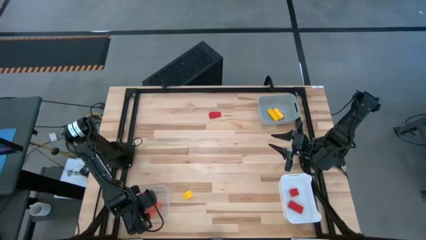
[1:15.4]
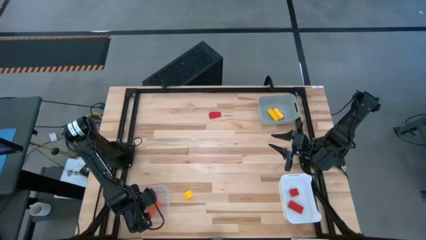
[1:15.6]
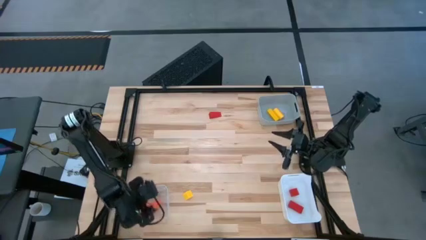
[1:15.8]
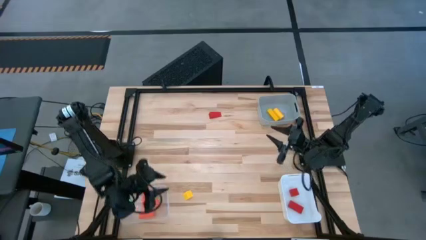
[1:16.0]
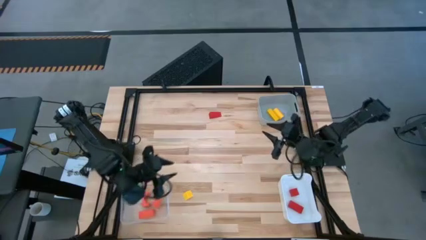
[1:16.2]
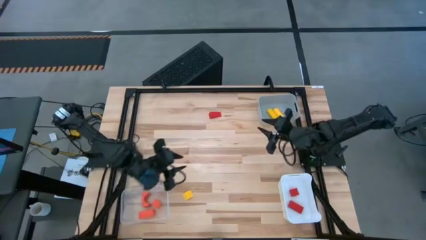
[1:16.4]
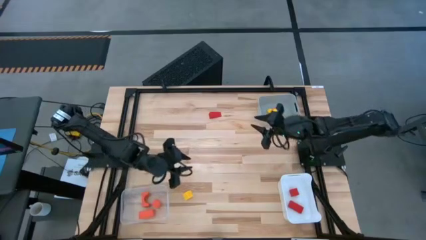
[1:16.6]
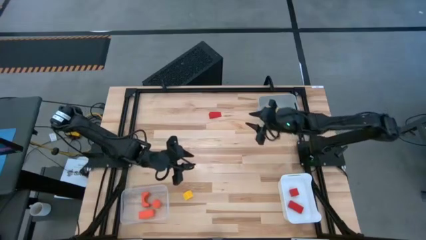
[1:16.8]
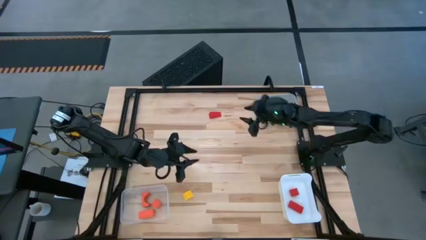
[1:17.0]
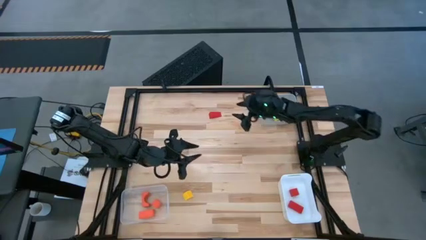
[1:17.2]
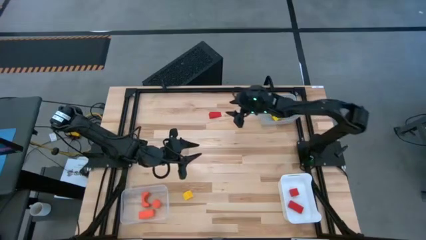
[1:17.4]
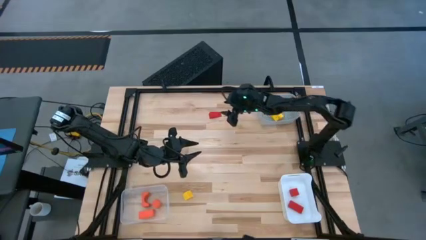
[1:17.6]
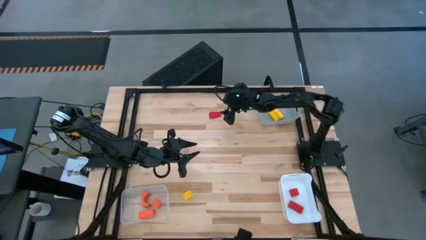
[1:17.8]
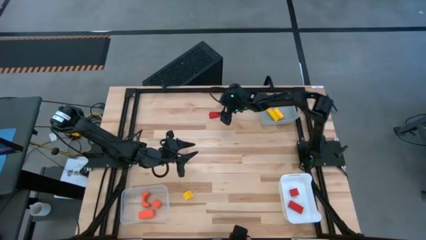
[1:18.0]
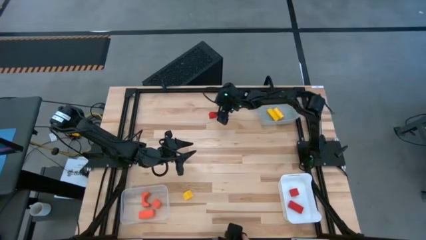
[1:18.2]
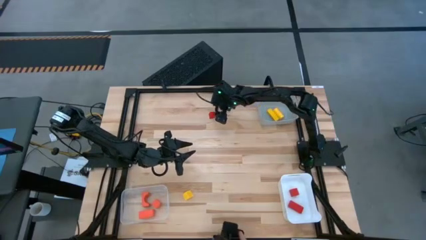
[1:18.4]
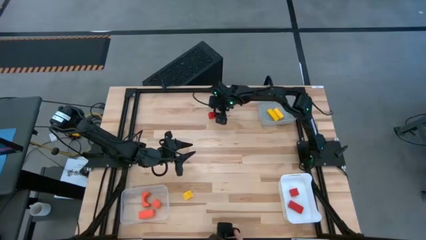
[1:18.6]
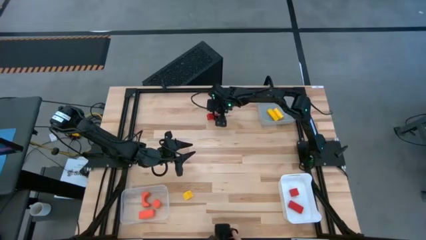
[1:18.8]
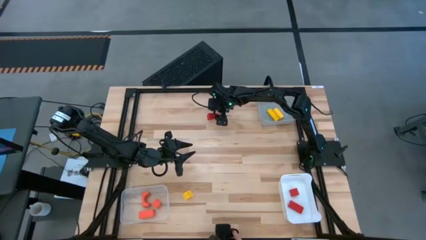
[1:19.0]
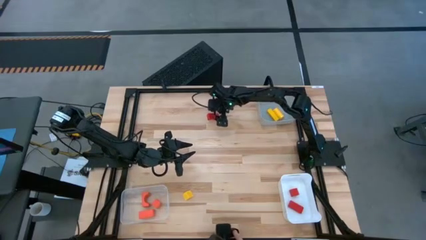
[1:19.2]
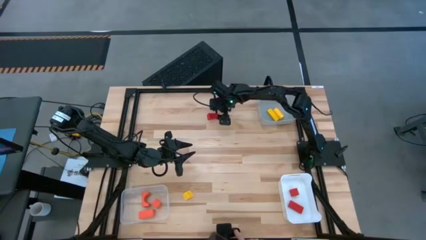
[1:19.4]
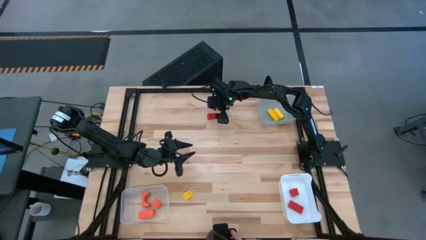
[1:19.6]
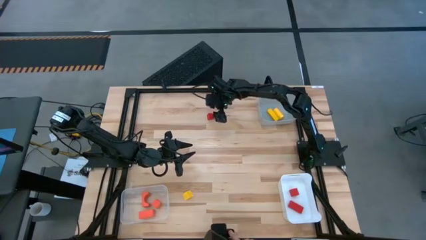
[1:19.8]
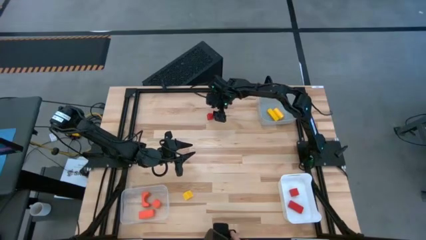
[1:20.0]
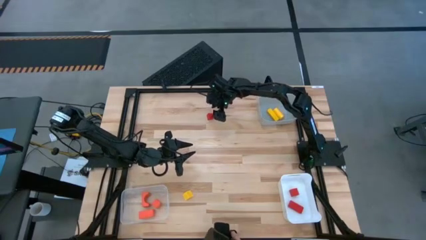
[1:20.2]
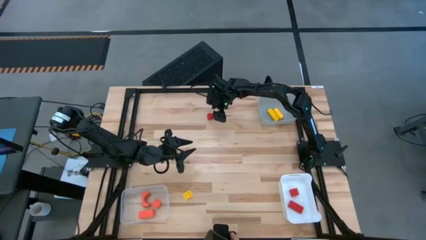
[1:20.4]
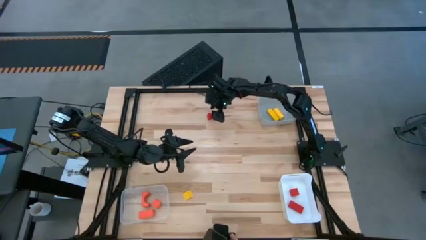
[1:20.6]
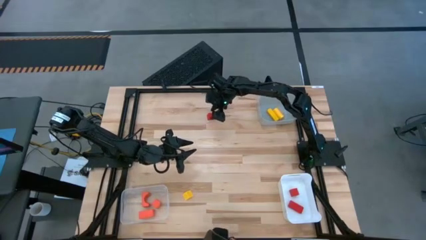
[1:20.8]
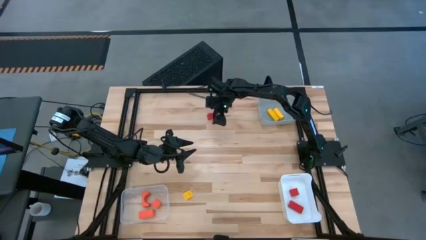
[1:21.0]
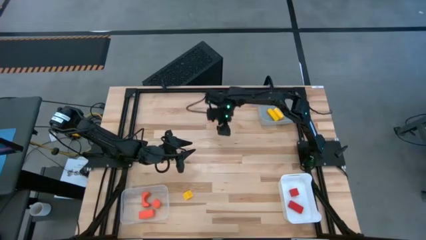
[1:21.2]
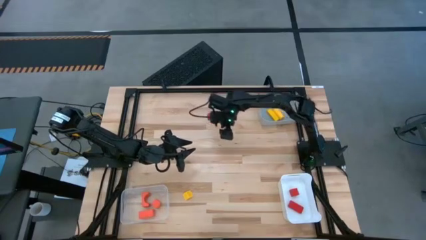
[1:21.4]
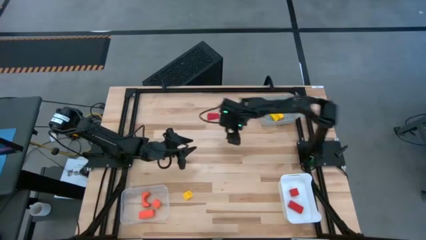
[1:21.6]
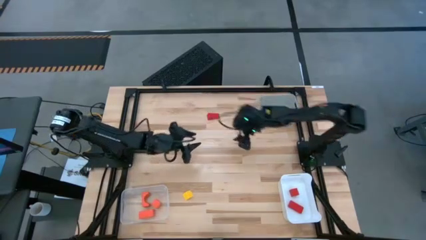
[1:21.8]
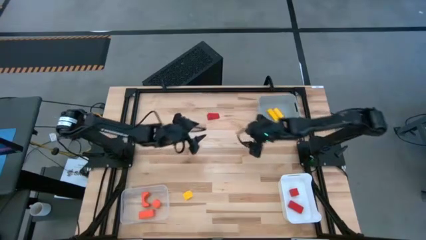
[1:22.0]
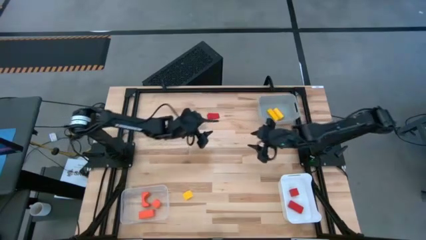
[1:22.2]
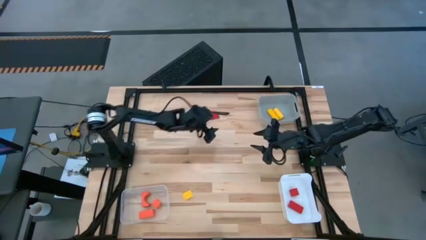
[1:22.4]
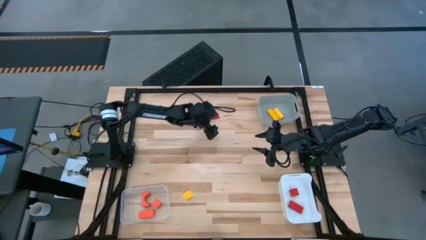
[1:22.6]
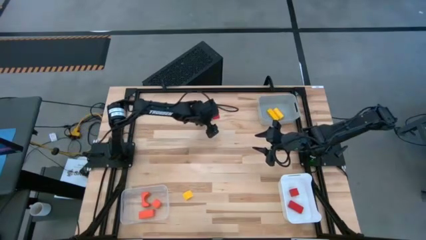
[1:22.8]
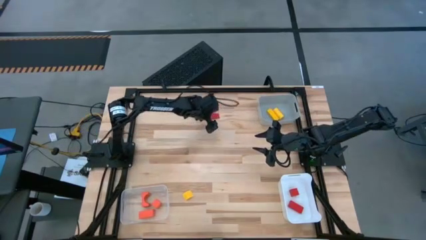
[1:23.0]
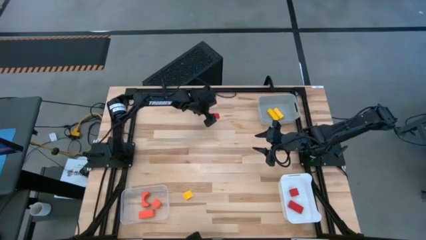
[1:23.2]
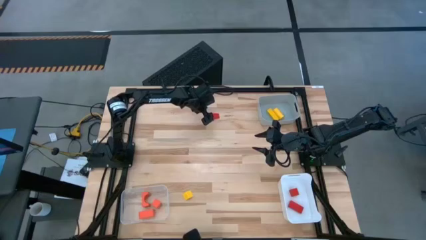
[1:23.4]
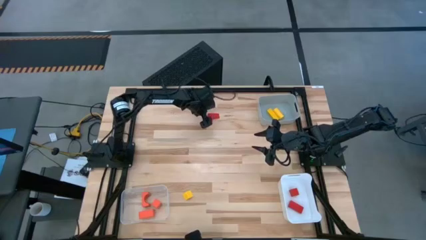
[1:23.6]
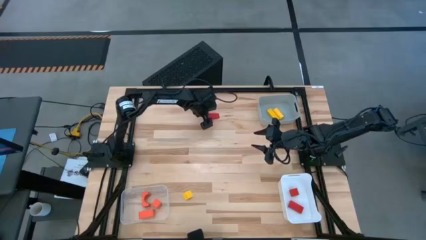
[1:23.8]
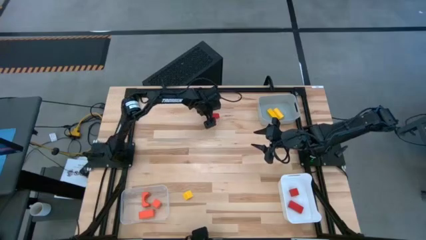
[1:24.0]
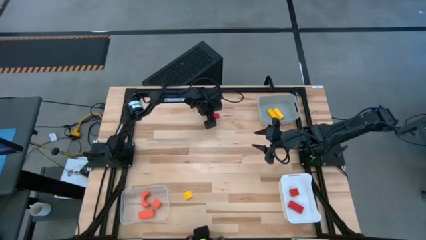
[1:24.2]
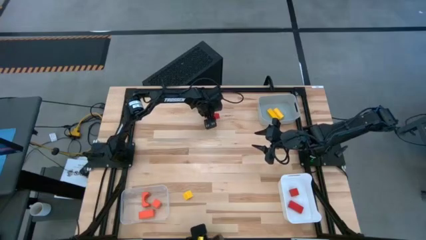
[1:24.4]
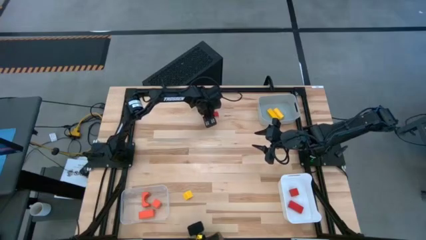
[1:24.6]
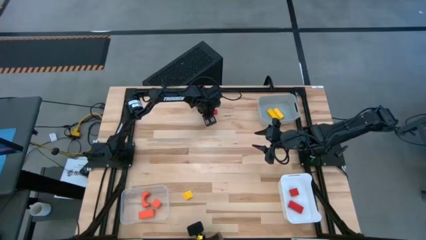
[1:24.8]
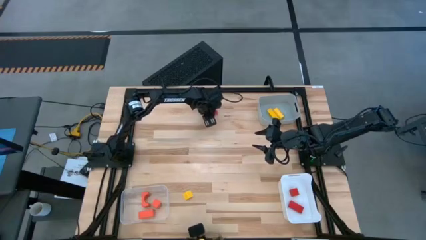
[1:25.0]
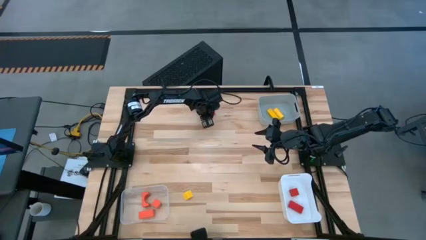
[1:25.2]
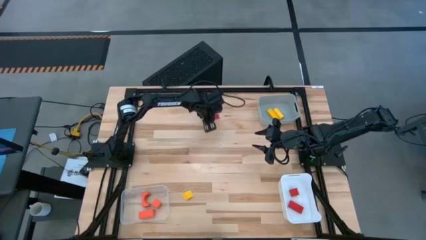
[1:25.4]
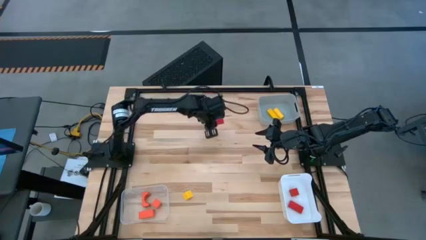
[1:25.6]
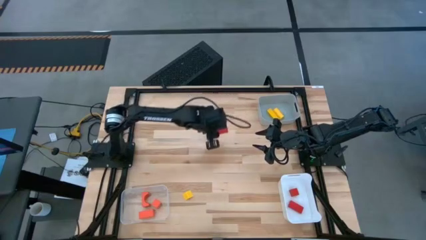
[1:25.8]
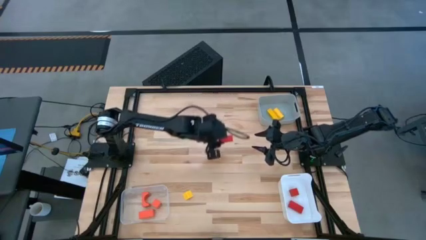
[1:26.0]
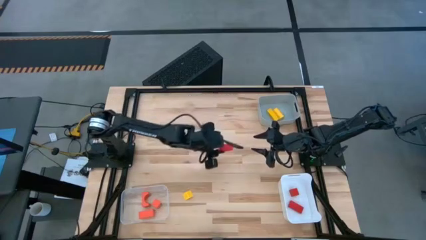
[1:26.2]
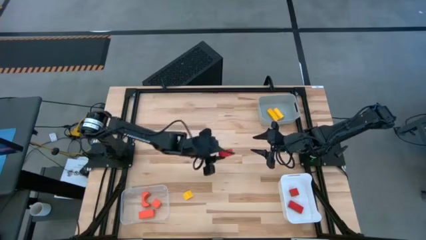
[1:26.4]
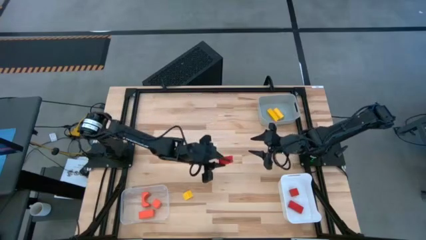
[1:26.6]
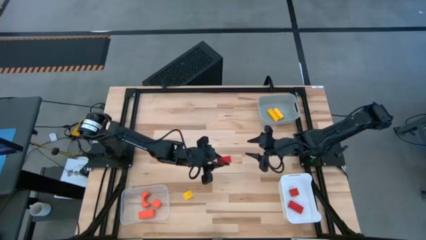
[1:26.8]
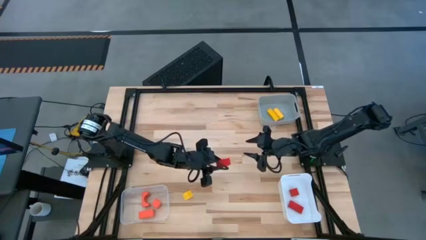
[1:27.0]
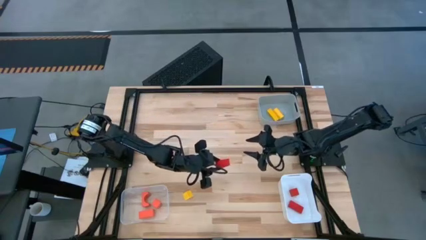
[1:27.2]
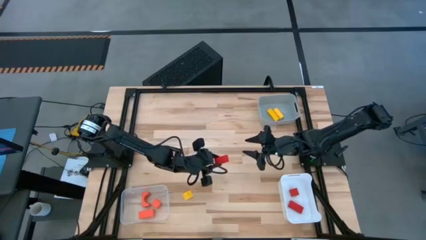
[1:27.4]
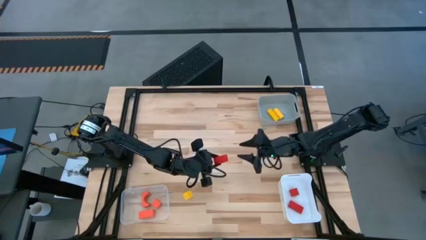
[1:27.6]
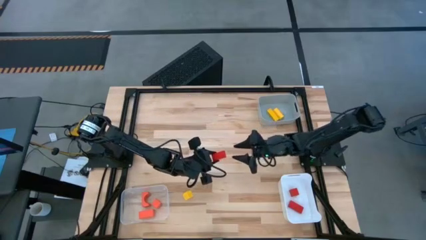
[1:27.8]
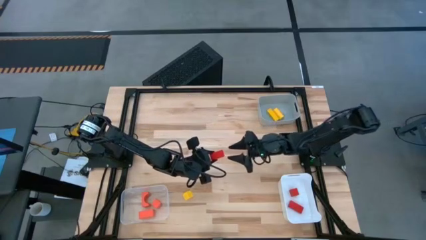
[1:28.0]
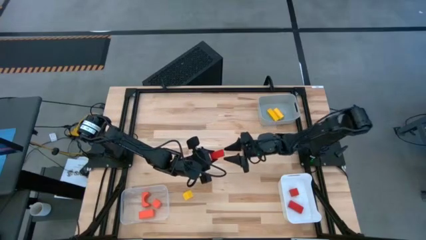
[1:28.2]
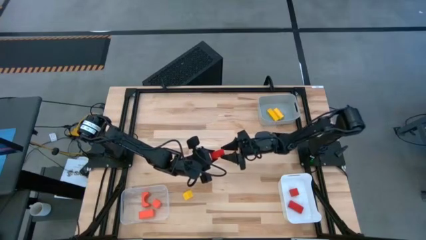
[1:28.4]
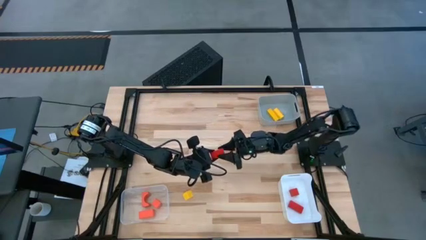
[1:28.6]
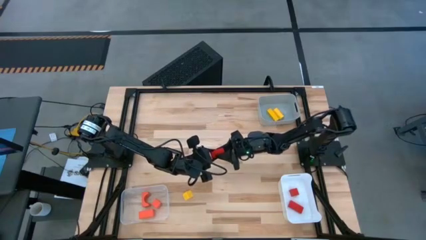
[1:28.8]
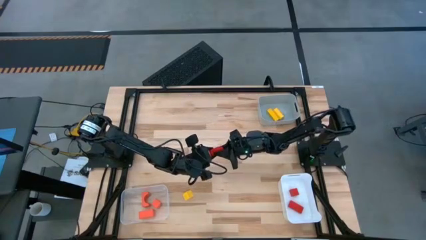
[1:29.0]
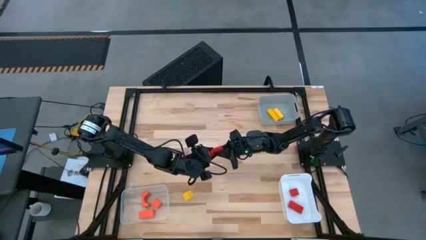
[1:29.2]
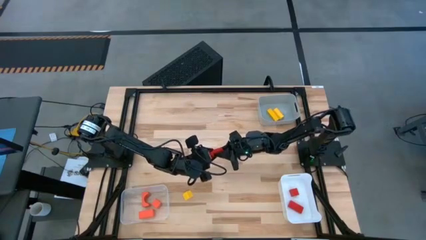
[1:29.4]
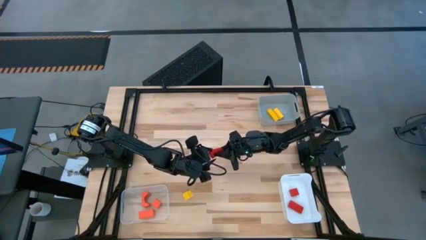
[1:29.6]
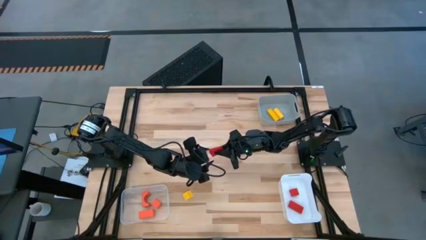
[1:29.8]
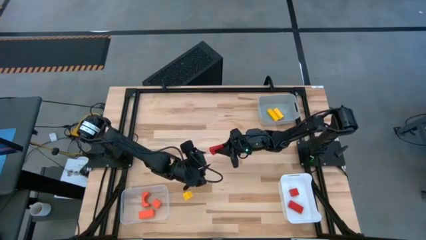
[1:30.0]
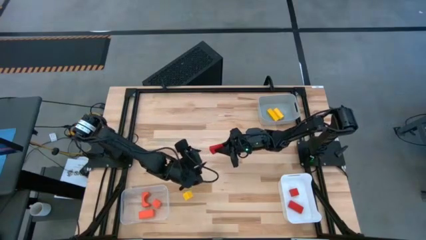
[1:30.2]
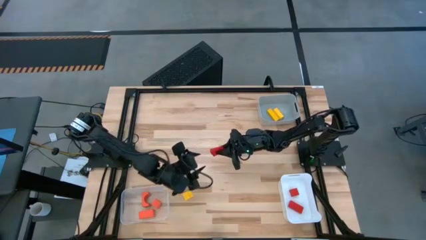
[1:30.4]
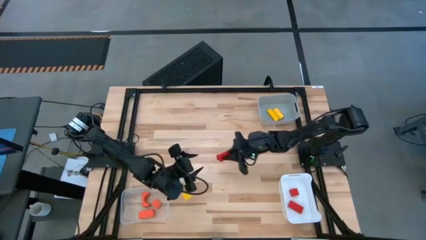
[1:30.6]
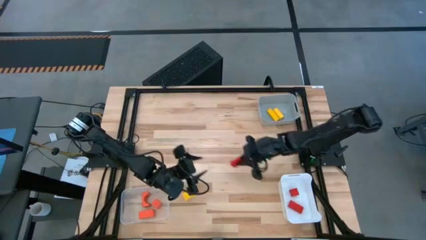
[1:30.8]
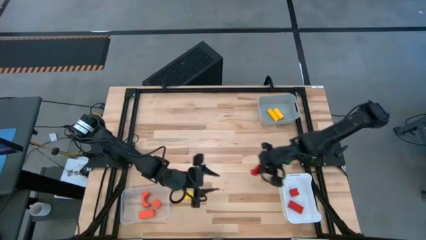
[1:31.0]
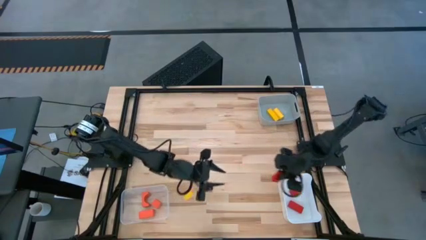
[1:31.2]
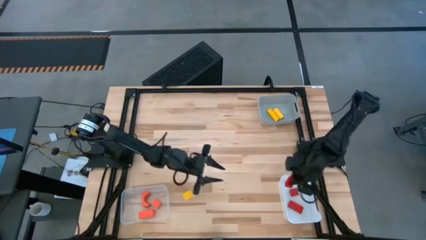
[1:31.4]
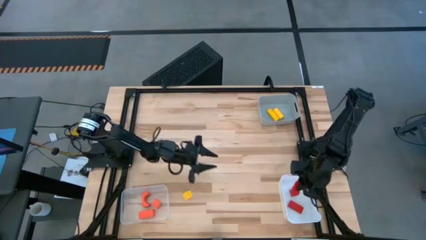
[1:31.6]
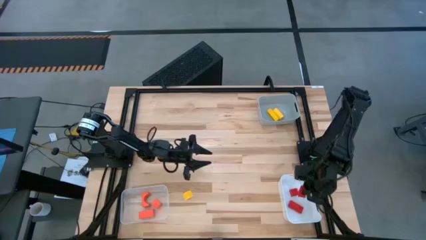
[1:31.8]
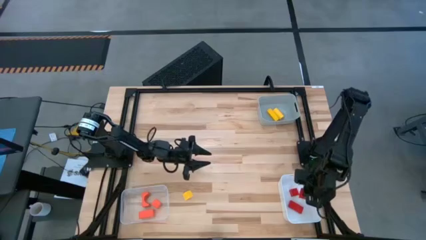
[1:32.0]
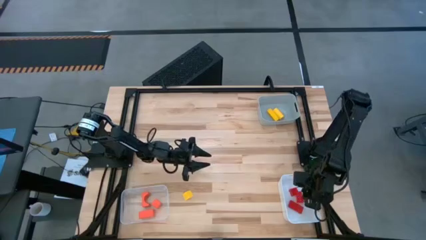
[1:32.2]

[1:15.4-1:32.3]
Task: Sort & place blocks by color
Put the red block into the white bin
